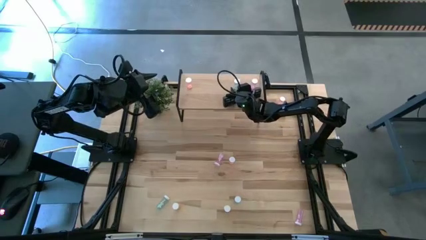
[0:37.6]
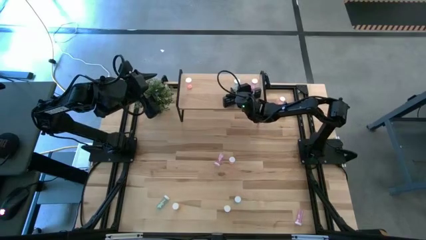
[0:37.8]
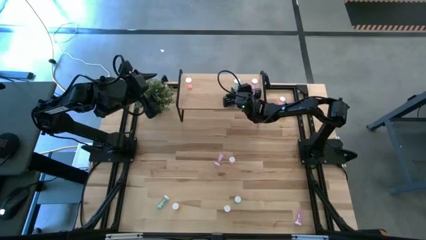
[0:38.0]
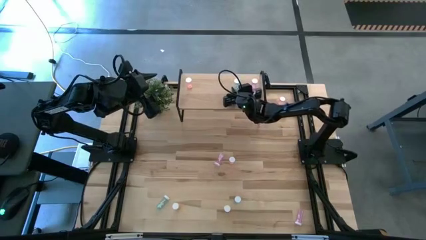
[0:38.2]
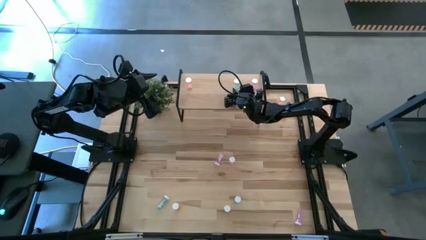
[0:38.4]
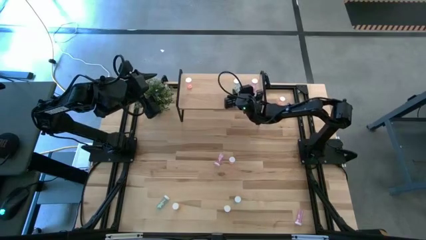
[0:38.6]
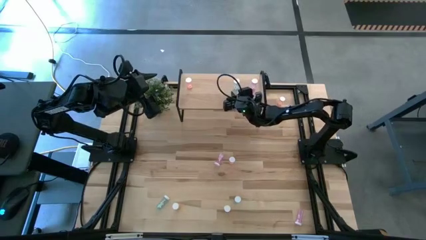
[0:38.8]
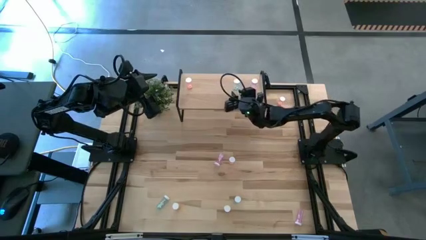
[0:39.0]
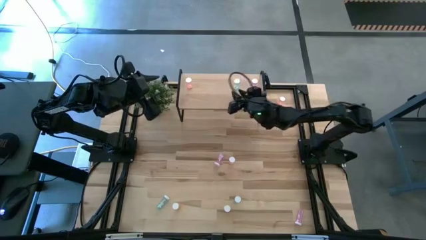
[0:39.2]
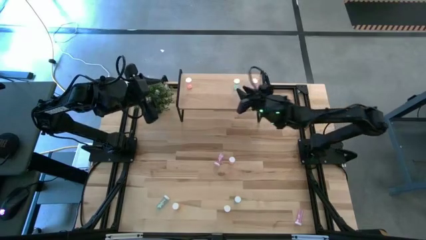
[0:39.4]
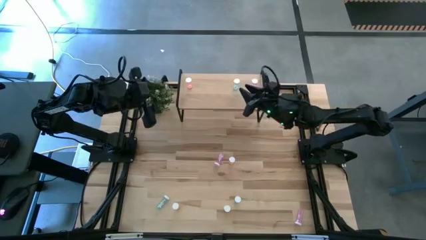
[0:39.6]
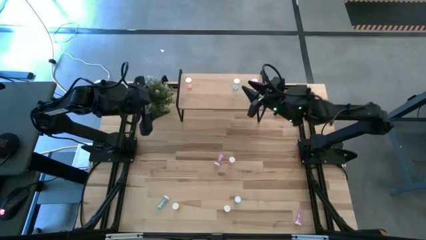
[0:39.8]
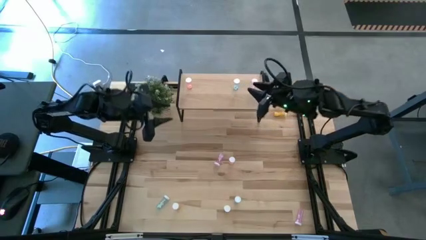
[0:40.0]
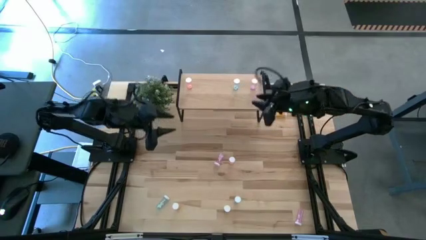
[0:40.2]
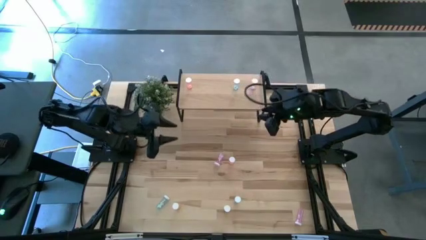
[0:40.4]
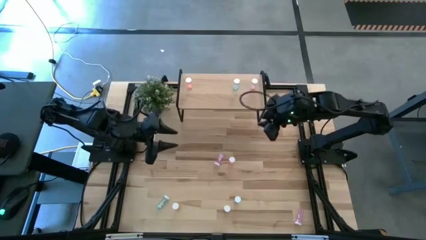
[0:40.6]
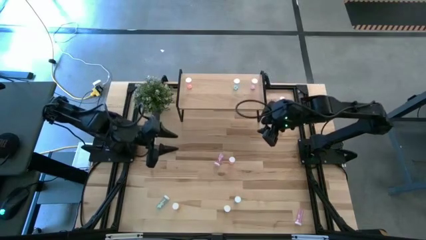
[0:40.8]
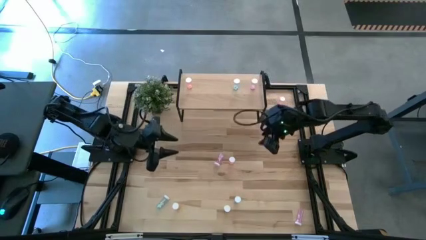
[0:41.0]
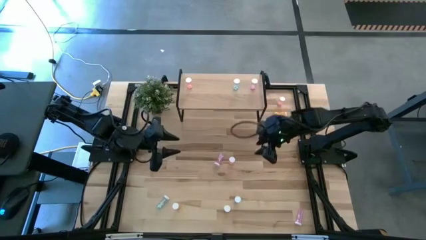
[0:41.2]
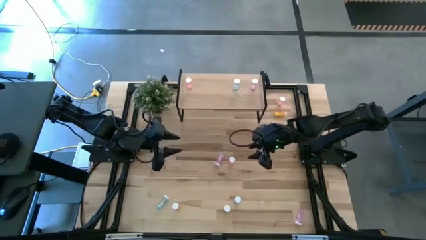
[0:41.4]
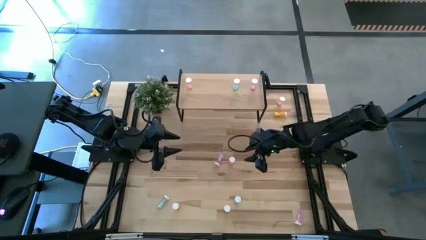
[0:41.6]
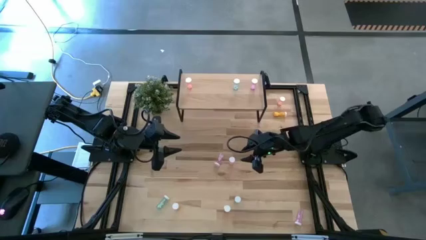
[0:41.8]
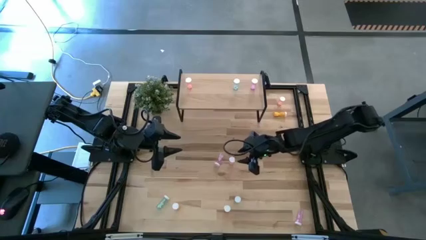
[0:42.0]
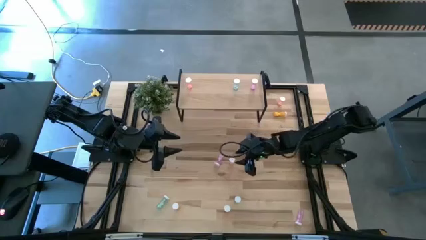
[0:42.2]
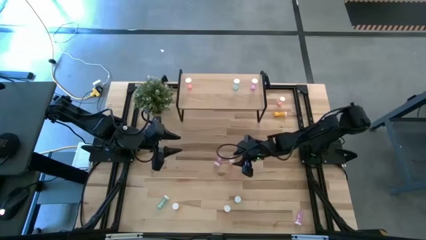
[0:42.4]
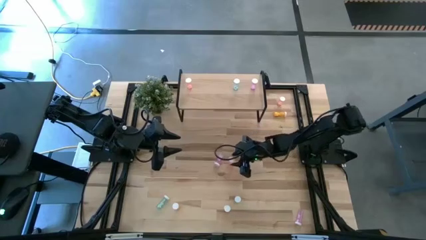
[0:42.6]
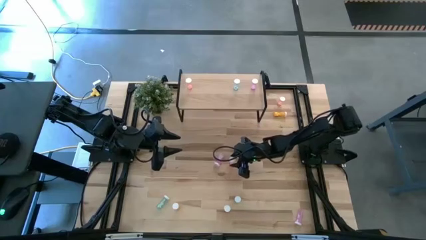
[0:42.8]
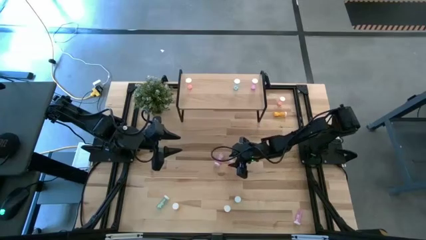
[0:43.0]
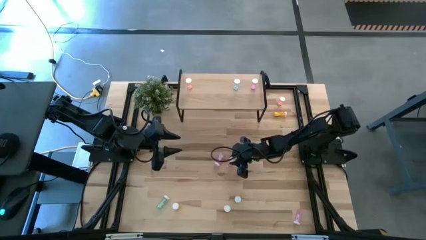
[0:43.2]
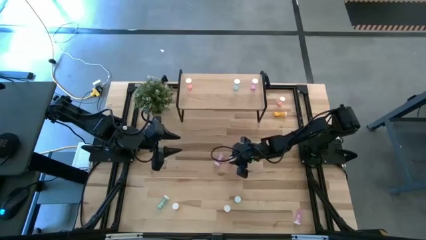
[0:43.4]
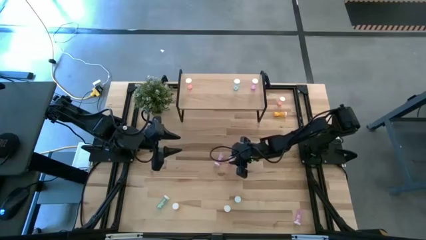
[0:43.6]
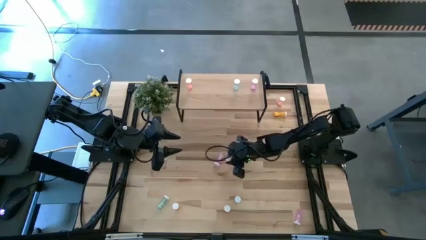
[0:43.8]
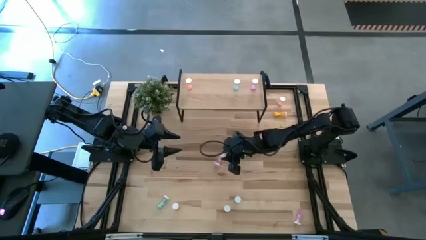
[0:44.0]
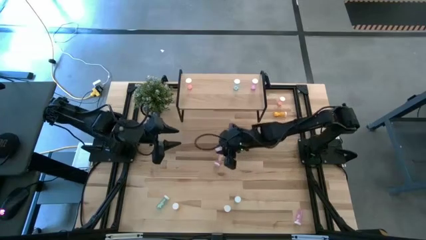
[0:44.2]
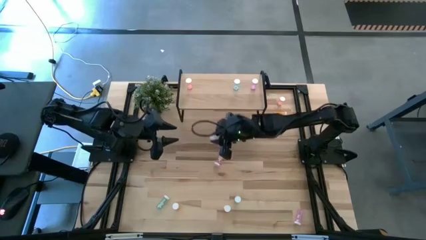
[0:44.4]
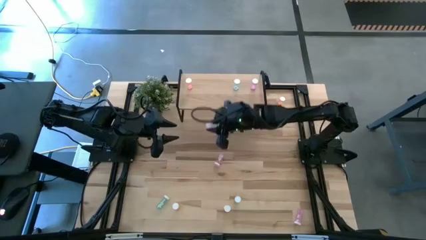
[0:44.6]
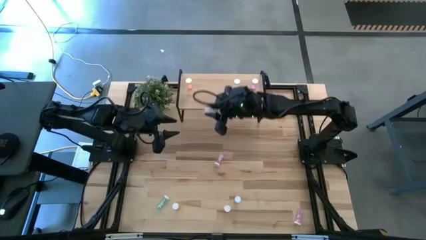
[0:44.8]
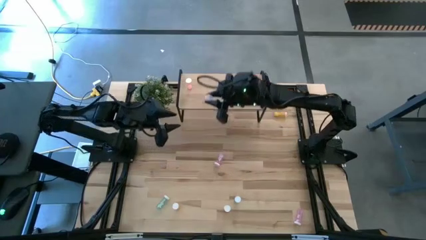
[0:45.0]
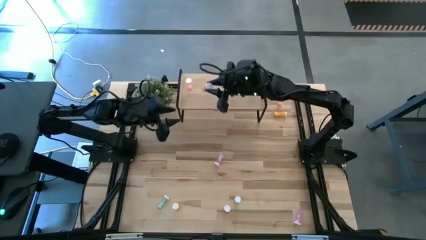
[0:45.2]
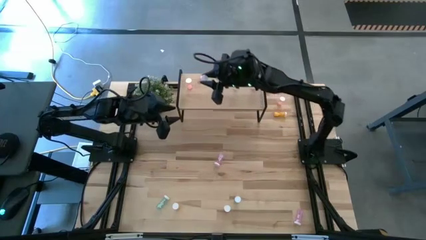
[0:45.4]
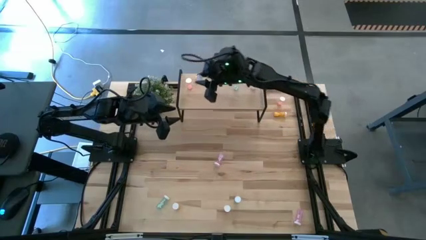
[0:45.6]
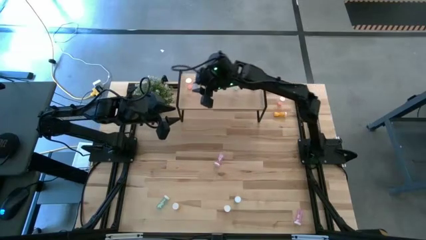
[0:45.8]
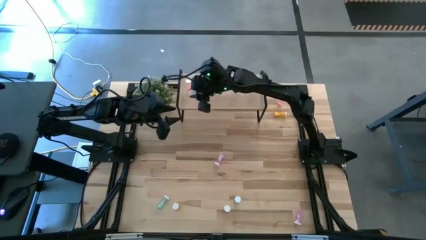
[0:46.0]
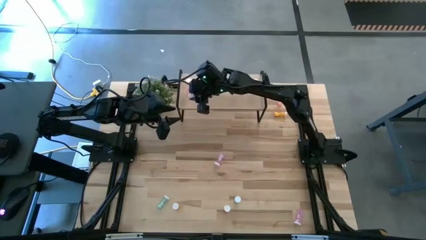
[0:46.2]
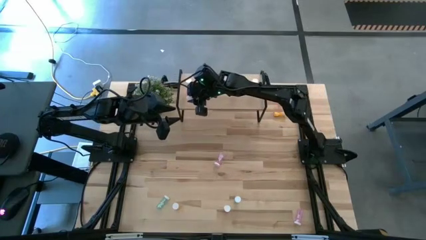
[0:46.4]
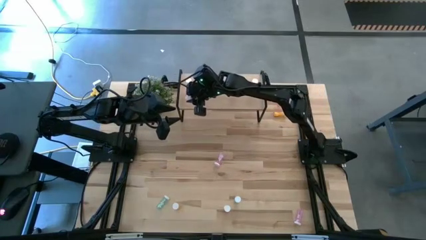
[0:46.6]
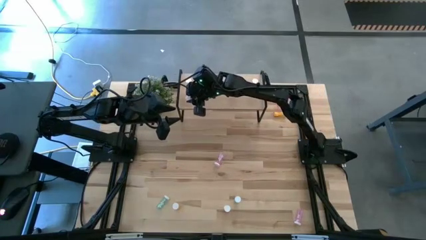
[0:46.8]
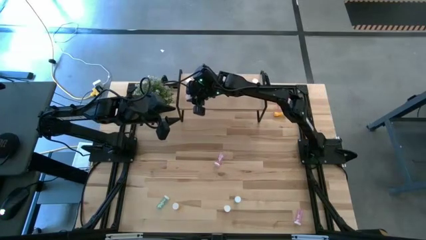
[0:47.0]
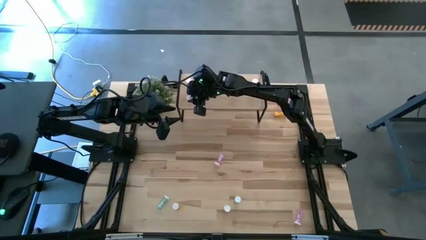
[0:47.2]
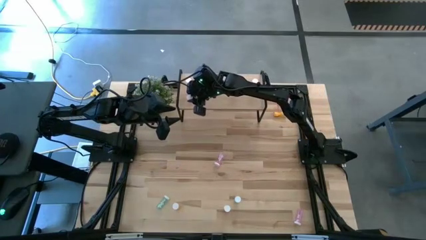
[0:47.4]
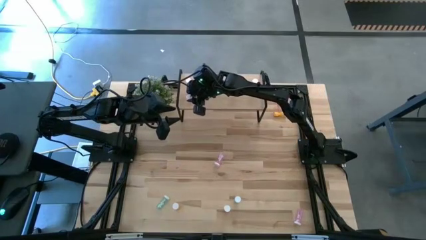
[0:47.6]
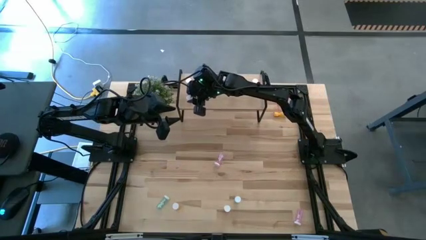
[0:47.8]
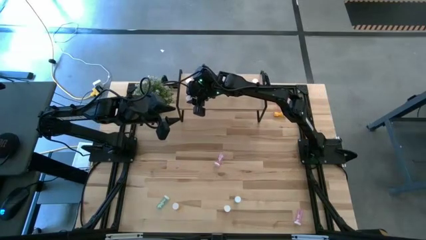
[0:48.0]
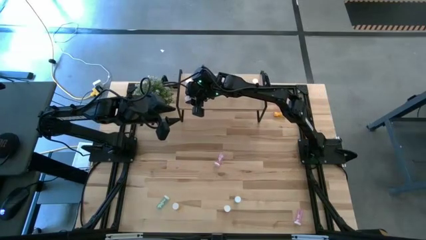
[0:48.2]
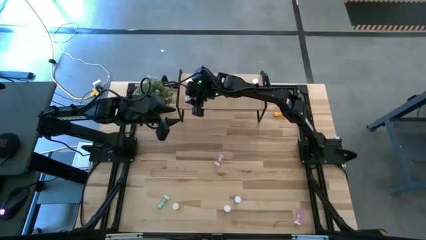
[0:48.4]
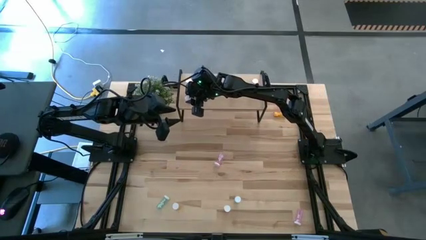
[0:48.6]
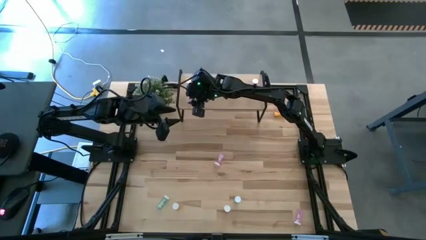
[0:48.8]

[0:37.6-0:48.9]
Task: Pick and place medicine bottles onto shelf by color
Put the bottom pink pill bottle on the shelf aligned with the other pink pill bottle
